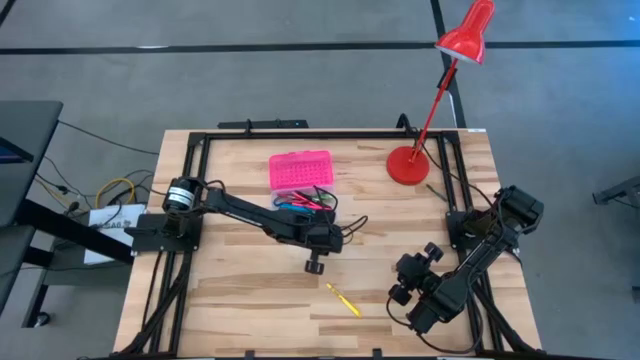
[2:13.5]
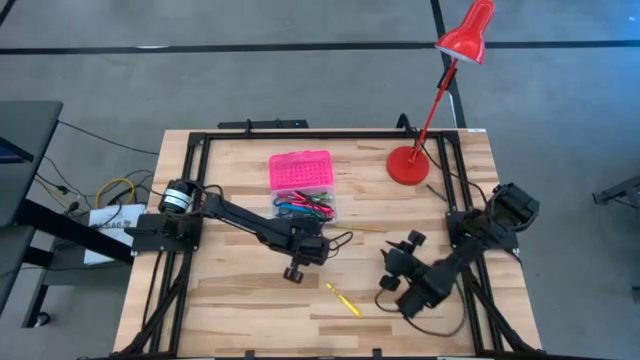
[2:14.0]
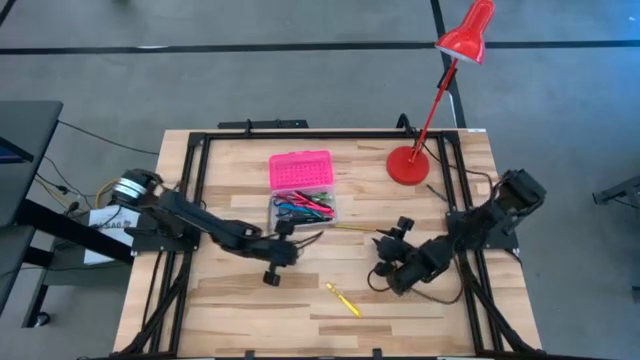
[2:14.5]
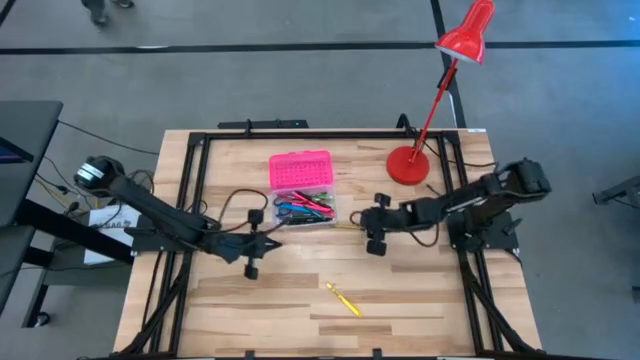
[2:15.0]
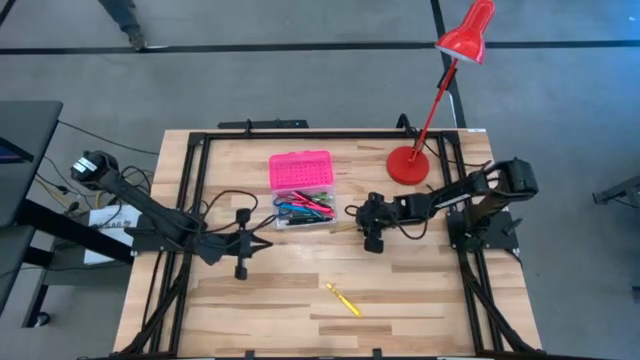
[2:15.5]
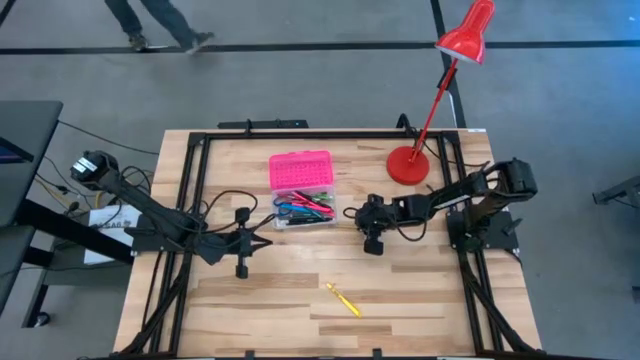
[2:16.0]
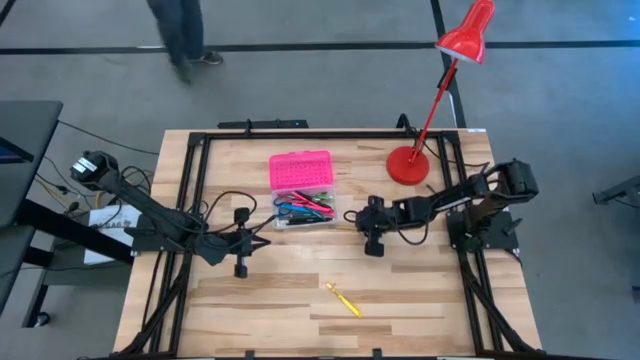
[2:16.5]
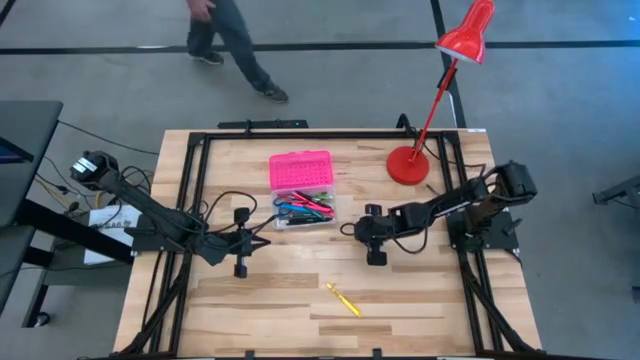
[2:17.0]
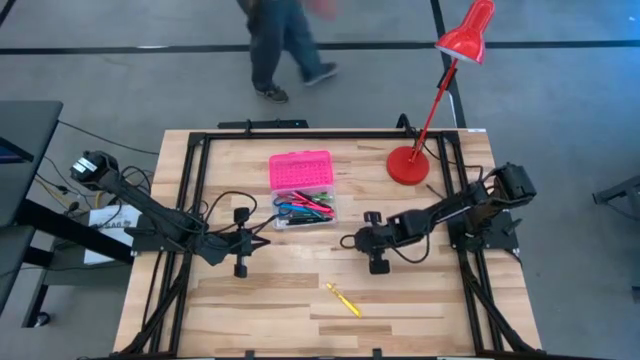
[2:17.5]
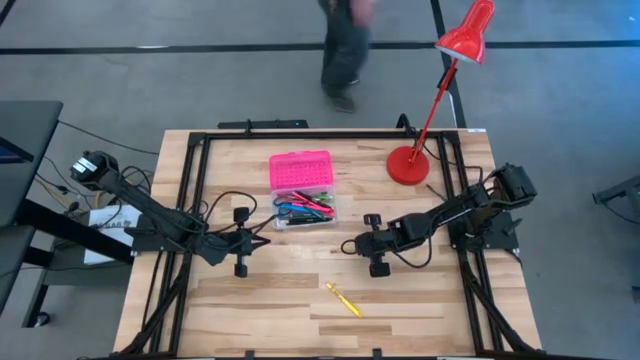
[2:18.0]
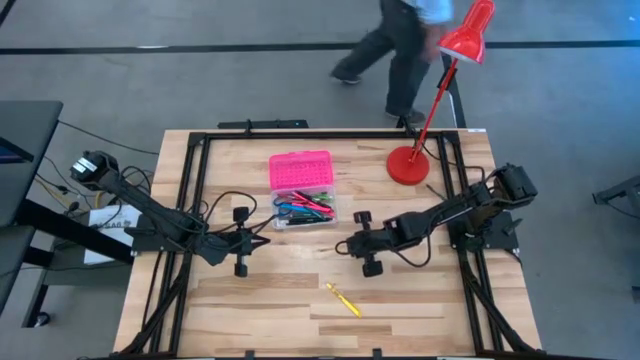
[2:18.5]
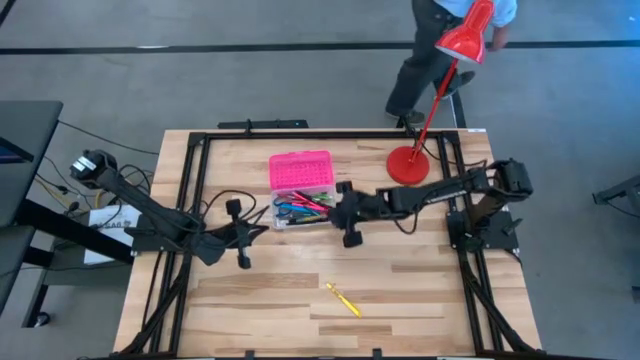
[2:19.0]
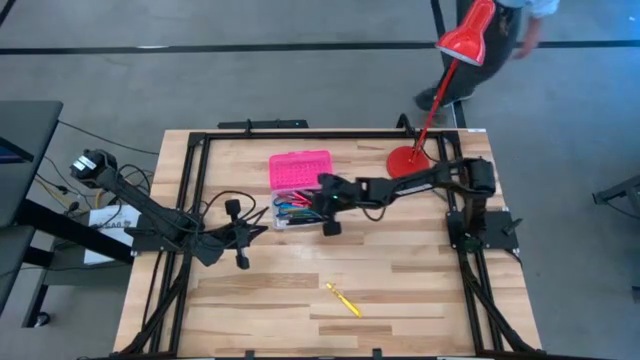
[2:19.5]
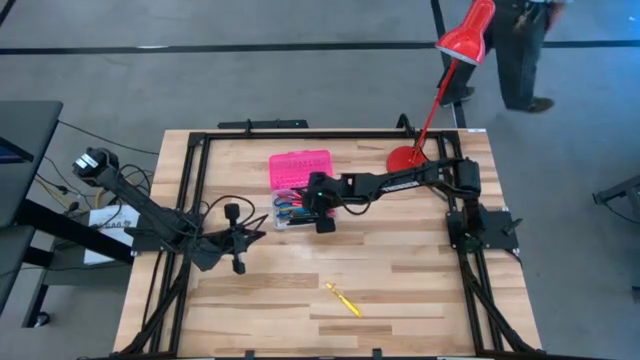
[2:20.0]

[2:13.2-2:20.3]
Task: Pick & place school supplies into a supply box
Put the yellow pencil into the pink supply box

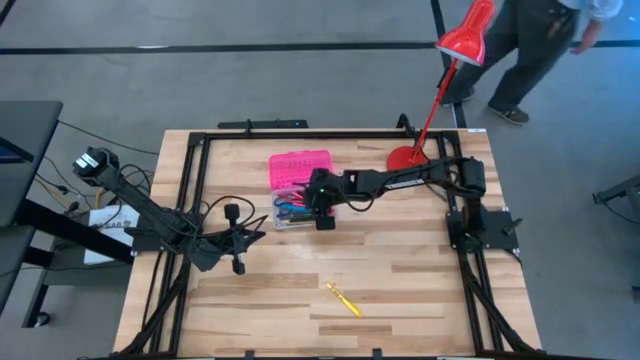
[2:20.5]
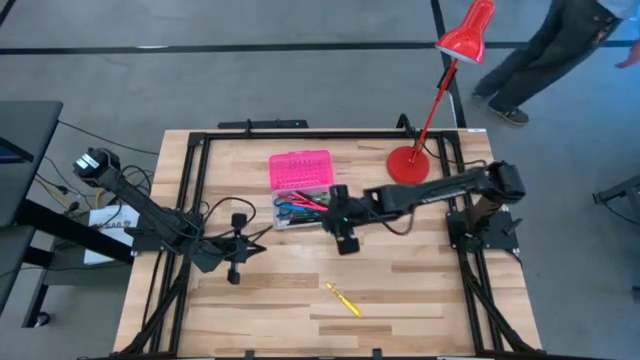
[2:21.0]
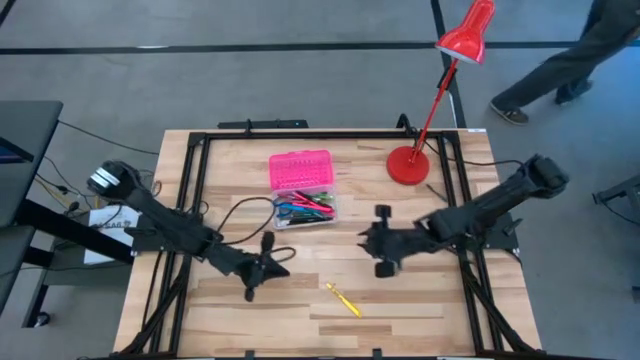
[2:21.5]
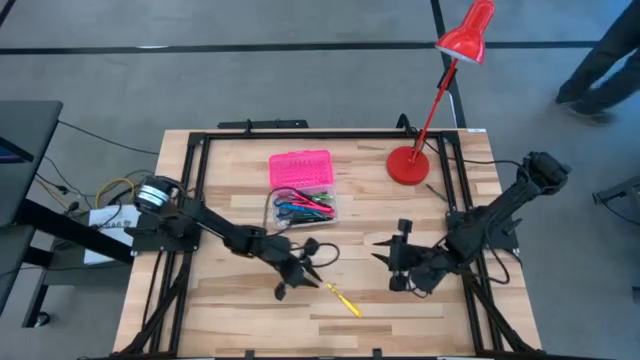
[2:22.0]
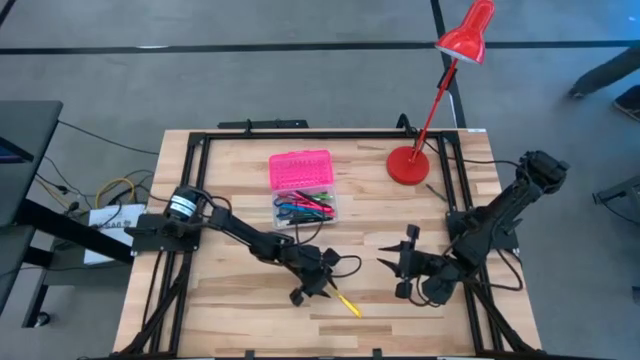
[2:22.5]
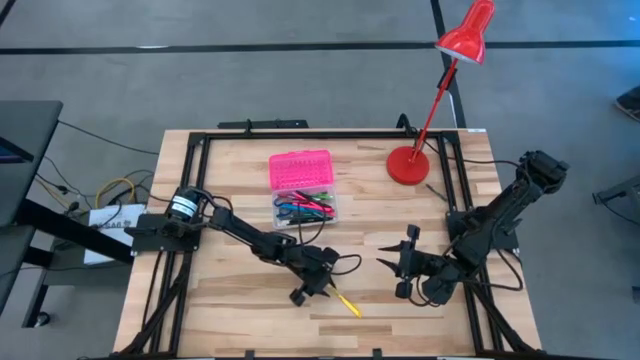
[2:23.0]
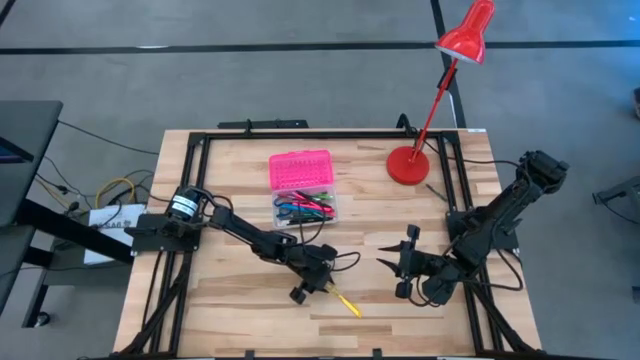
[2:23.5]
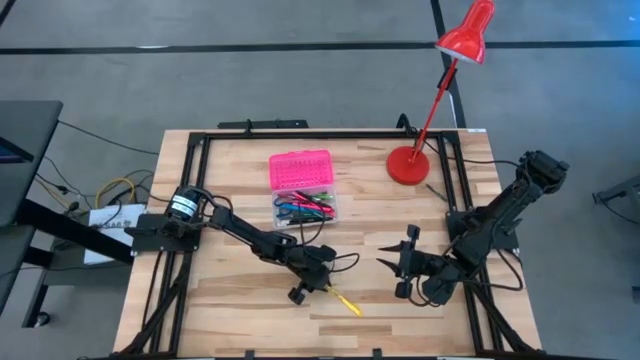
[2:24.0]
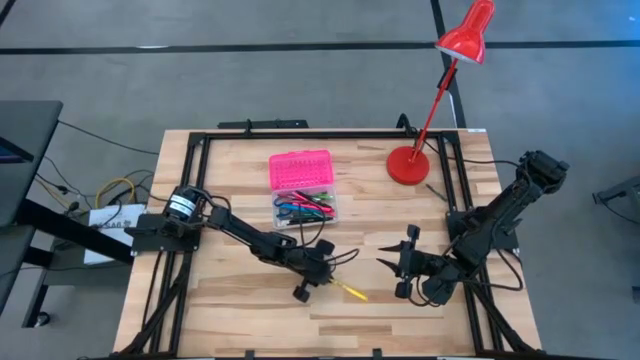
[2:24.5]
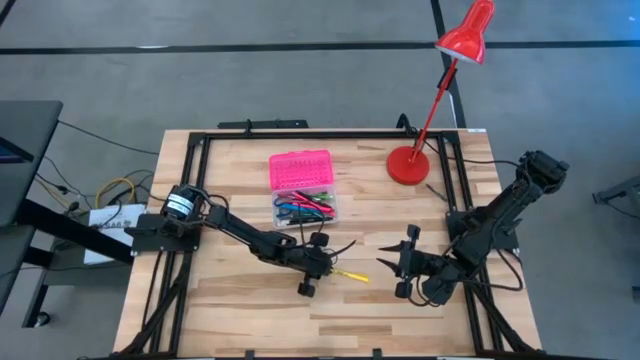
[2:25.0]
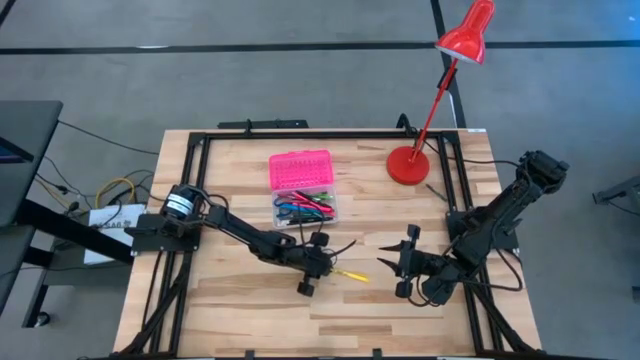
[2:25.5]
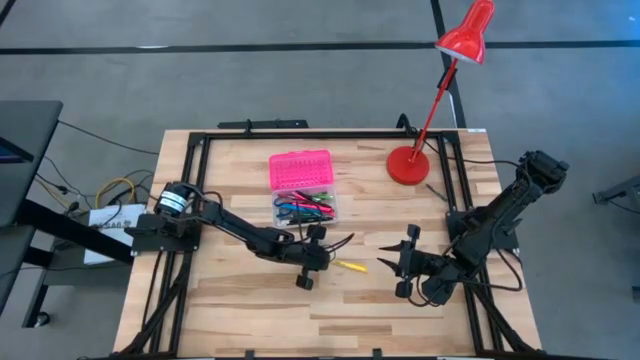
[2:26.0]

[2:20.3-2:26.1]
Put the yellow pen into the pink supply box

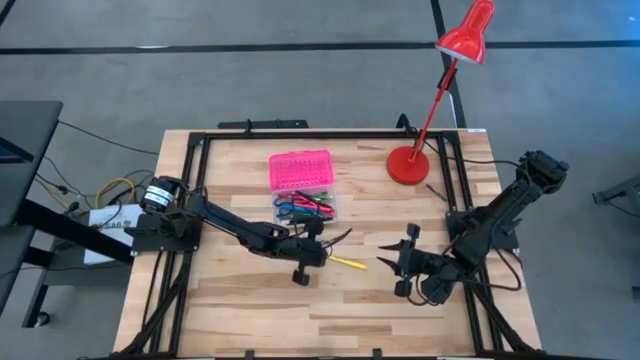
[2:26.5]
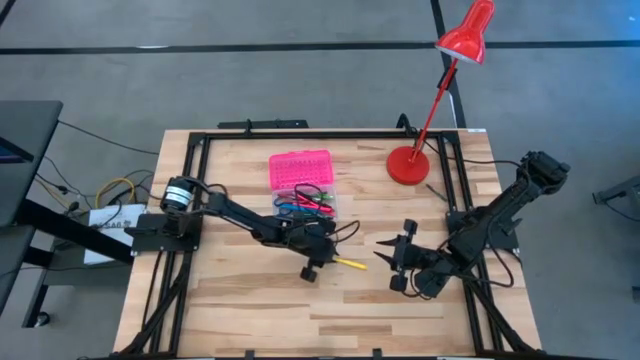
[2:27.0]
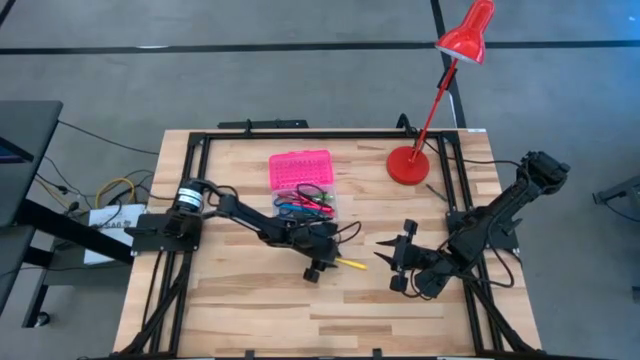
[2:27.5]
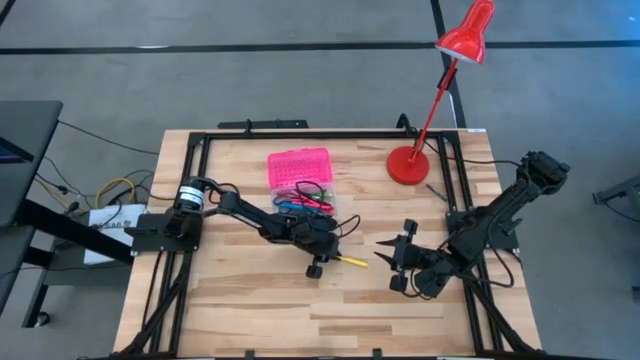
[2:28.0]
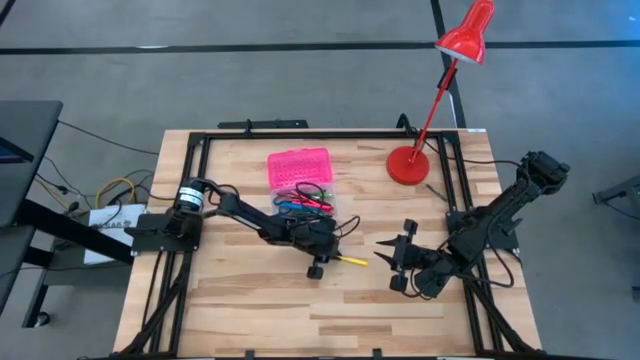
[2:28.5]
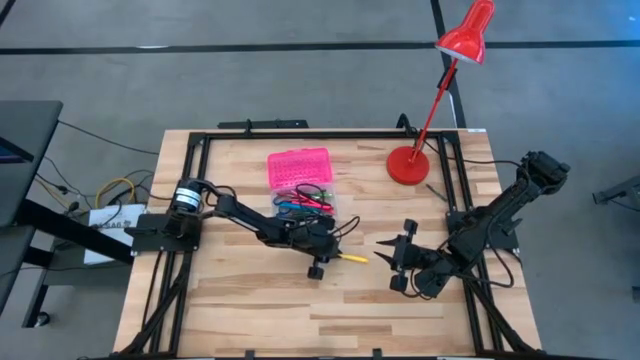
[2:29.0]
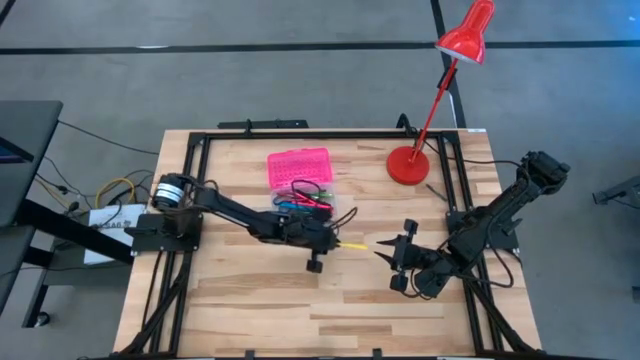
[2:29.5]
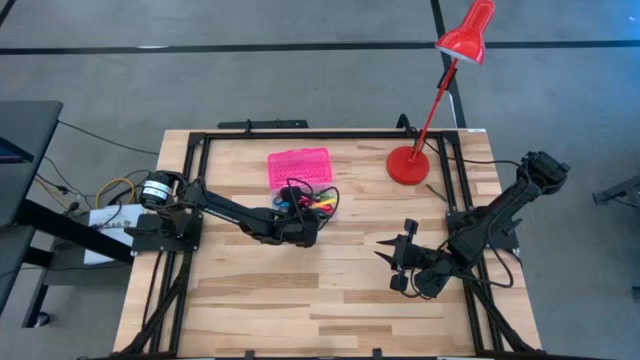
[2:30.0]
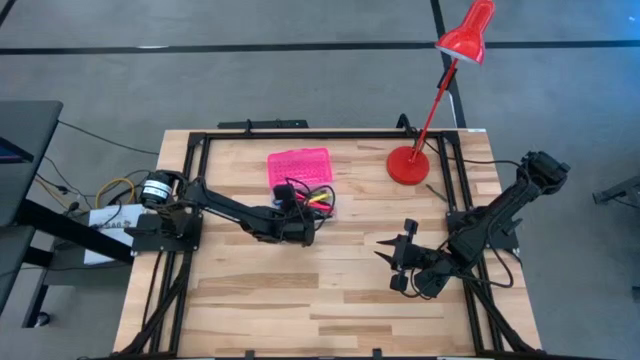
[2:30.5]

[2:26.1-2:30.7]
Put the yellow pen into the pink supply box
